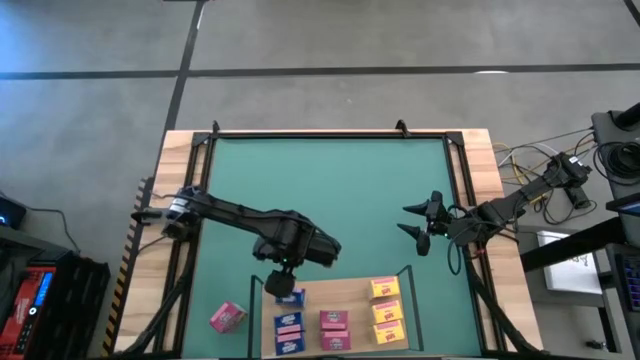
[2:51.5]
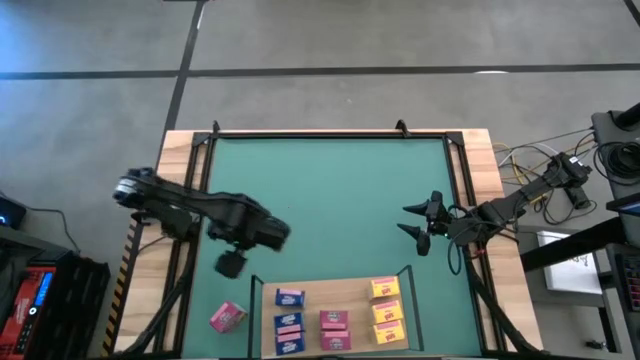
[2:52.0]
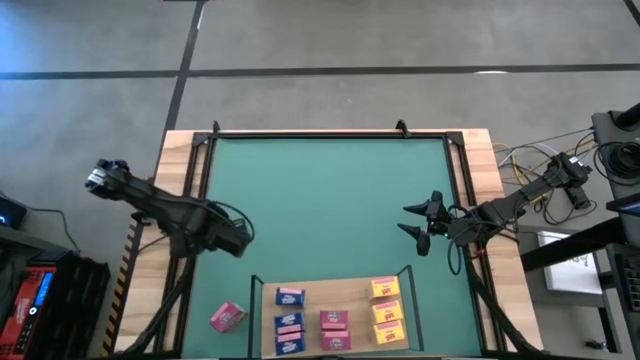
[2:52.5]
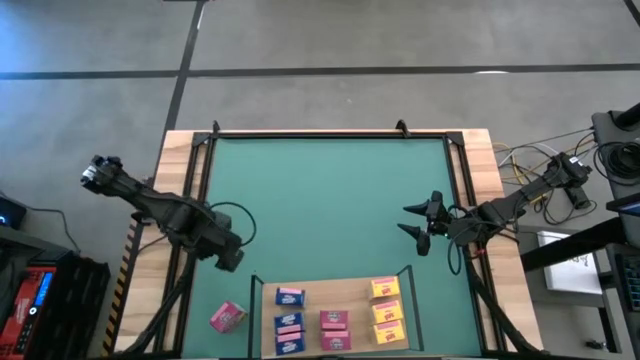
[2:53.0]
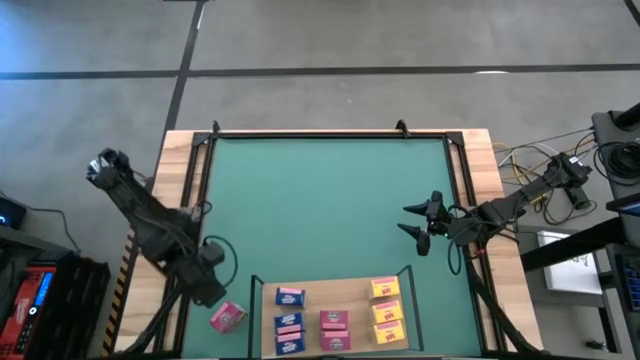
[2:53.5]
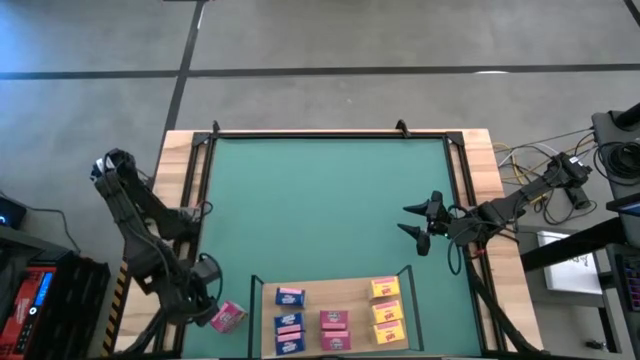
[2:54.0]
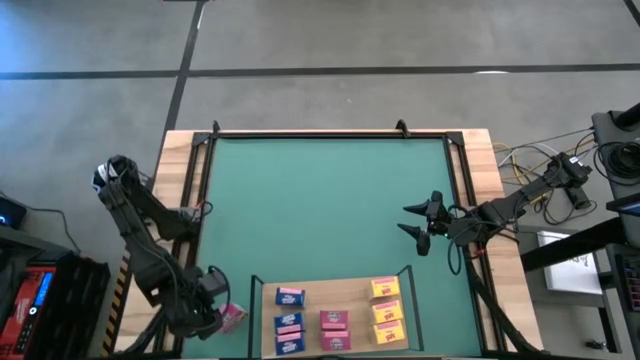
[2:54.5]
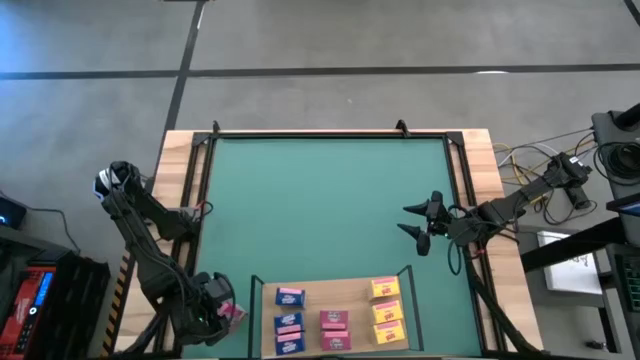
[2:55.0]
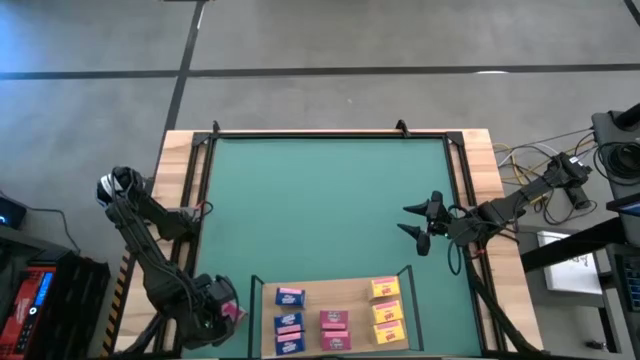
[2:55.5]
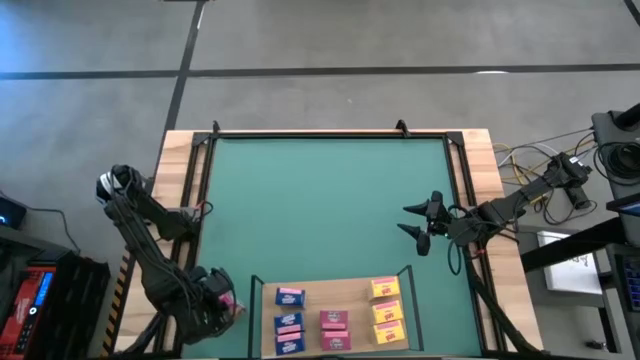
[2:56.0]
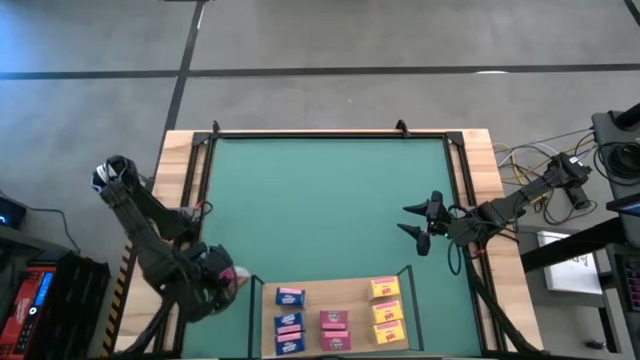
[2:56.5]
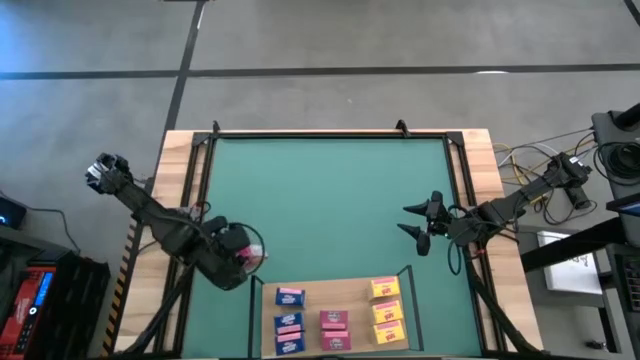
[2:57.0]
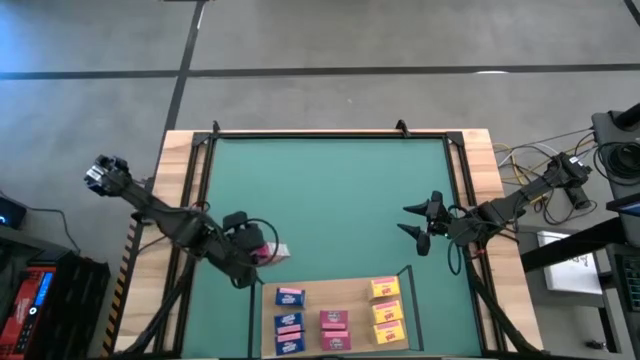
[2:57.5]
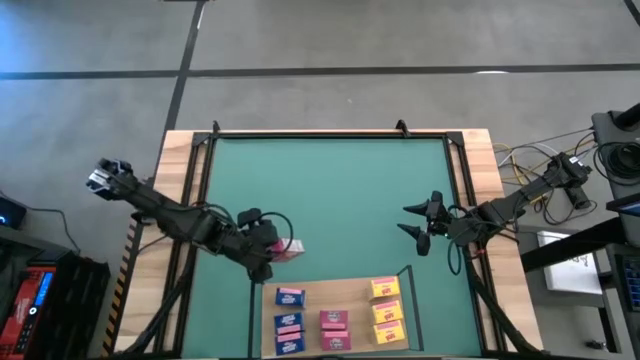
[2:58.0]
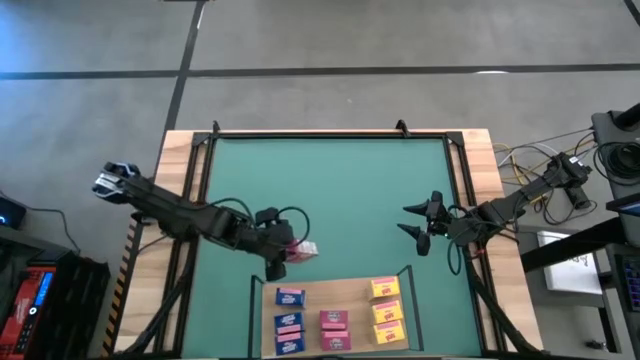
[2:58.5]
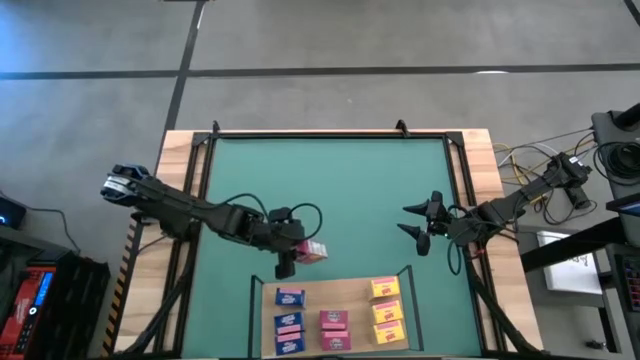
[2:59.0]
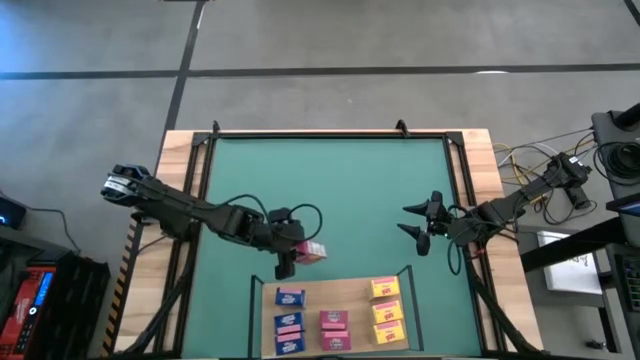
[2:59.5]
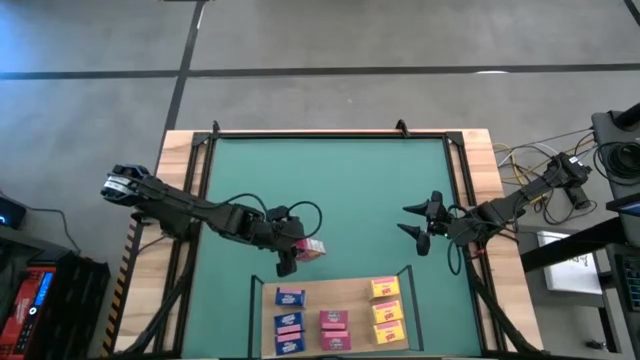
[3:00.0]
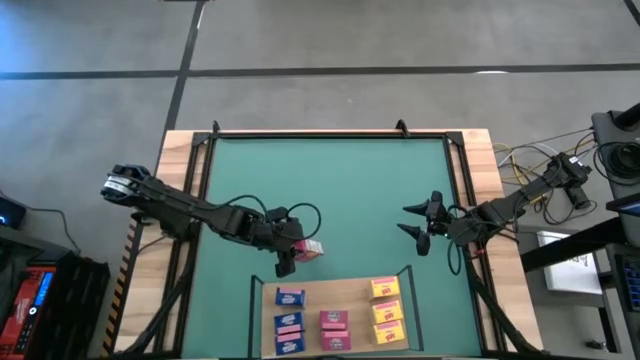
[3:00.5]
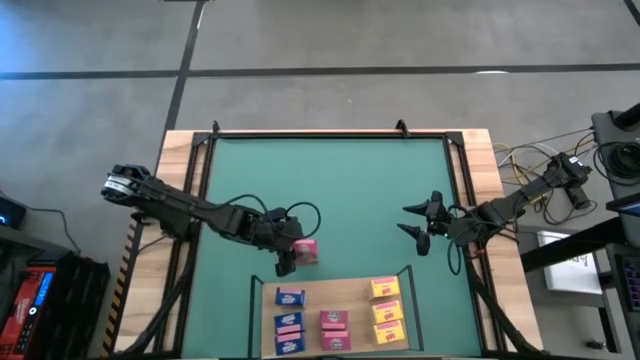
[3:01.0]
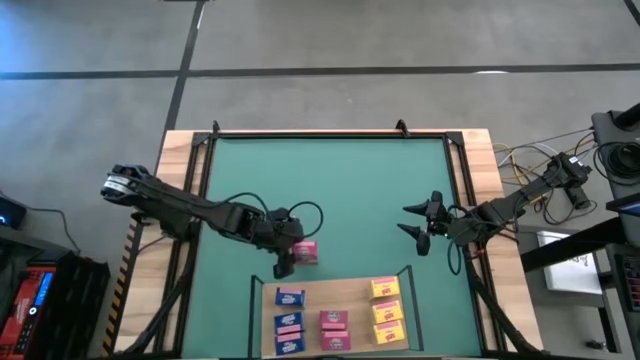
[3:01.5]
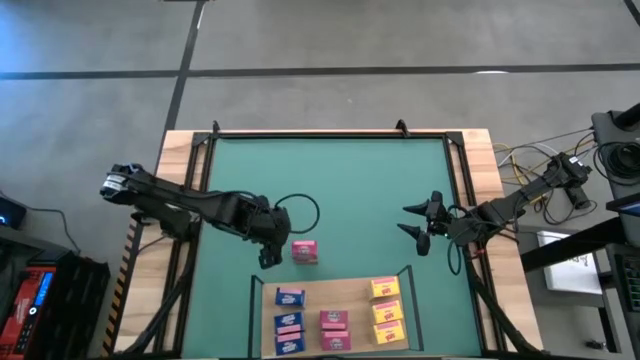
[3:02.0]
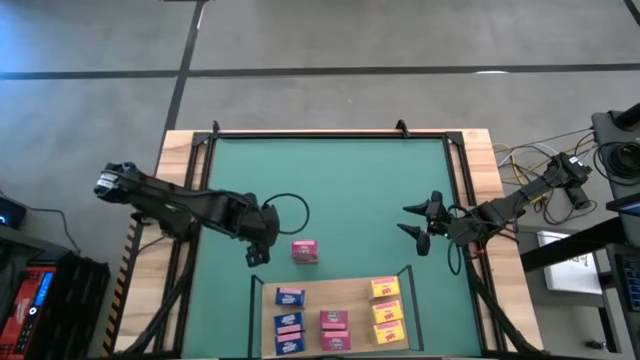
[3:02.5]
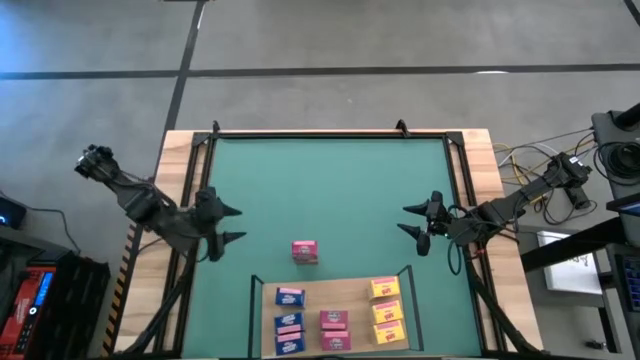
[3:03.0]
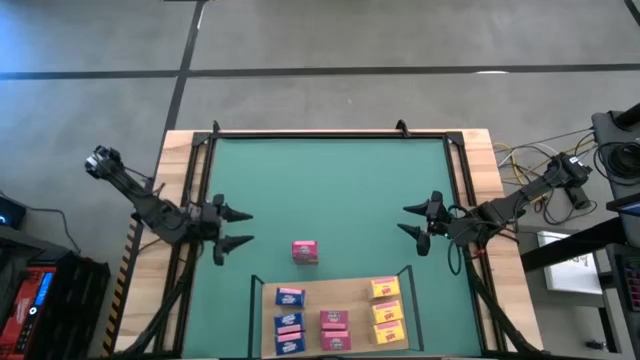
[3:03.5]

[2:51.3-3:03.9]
Task: Stack cereal on shelf
Put the violet cereal box on the shelf aligned with the other violet cereal boxes

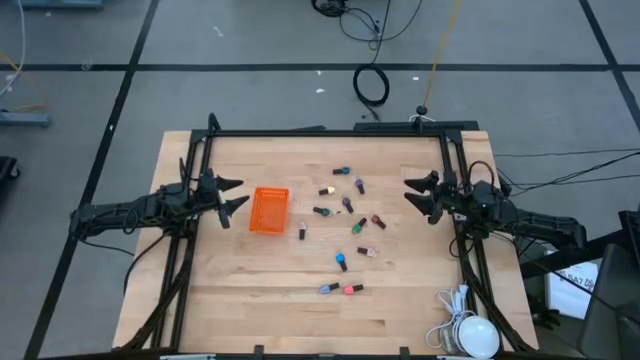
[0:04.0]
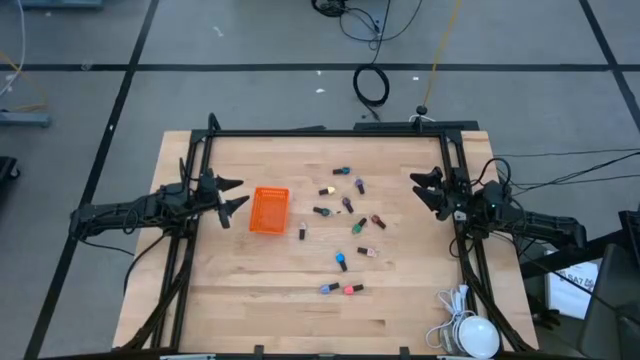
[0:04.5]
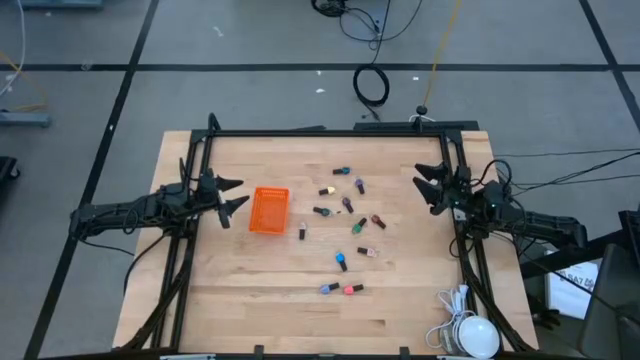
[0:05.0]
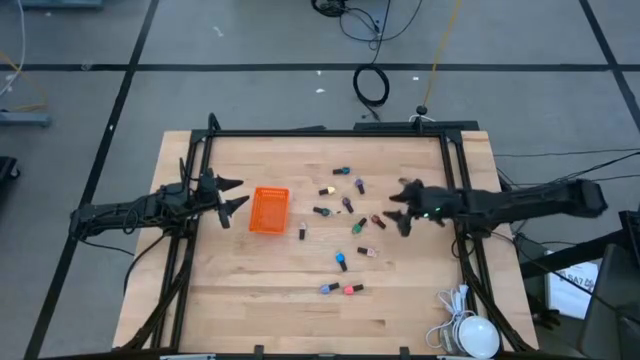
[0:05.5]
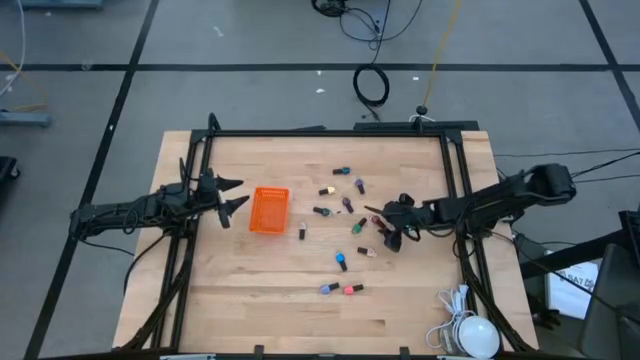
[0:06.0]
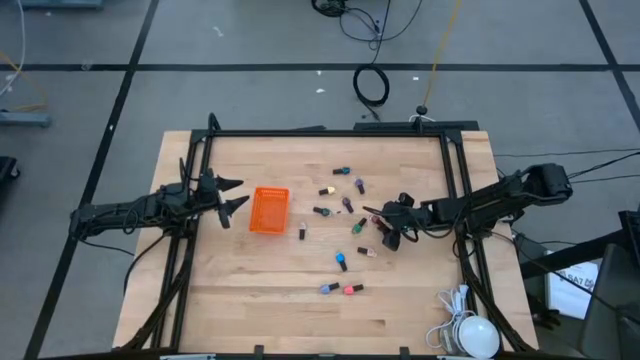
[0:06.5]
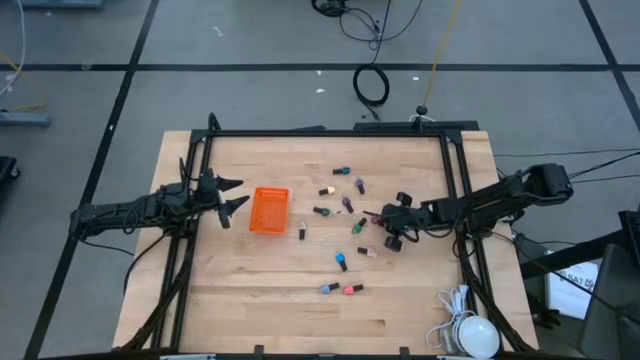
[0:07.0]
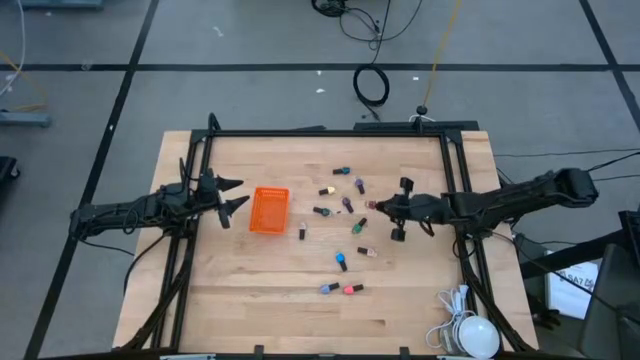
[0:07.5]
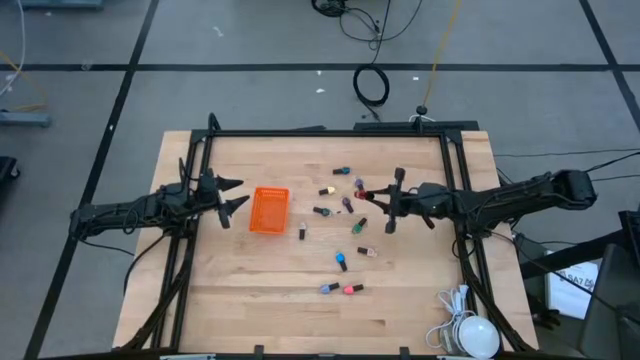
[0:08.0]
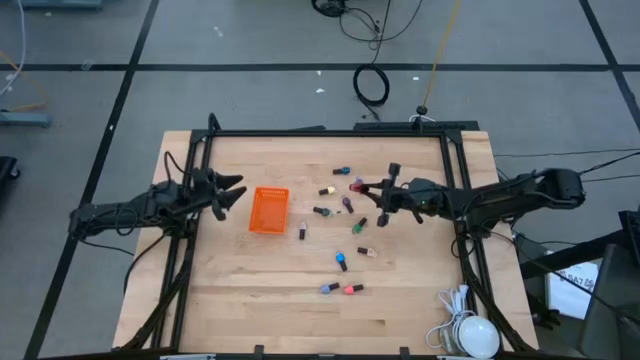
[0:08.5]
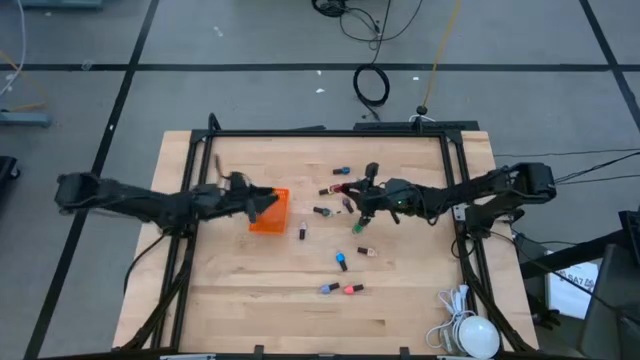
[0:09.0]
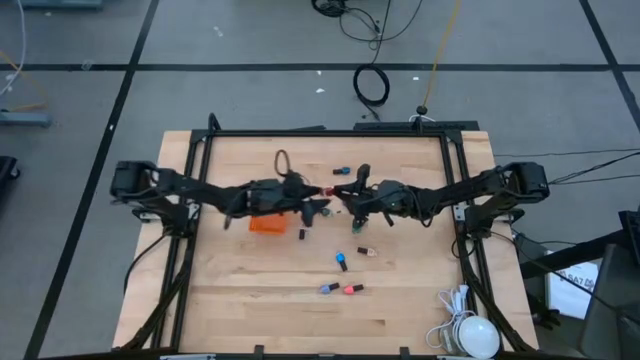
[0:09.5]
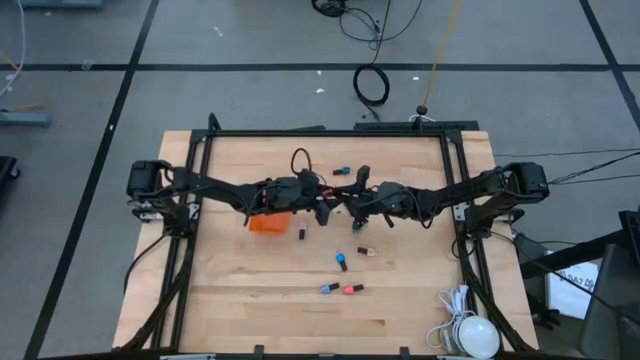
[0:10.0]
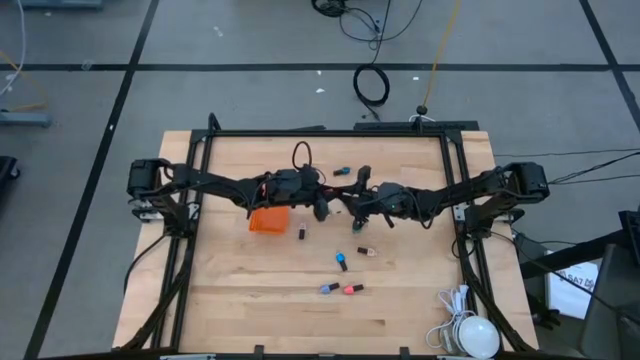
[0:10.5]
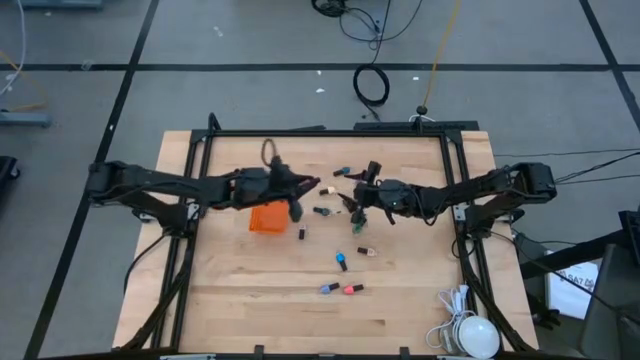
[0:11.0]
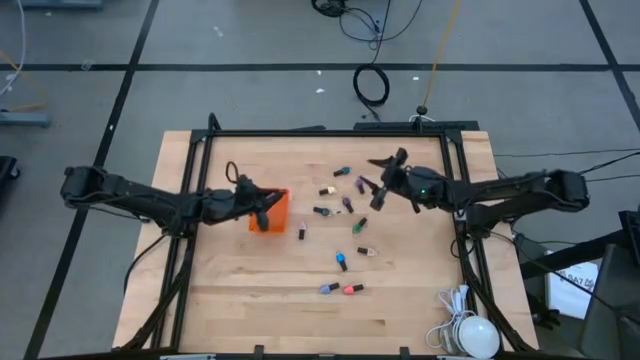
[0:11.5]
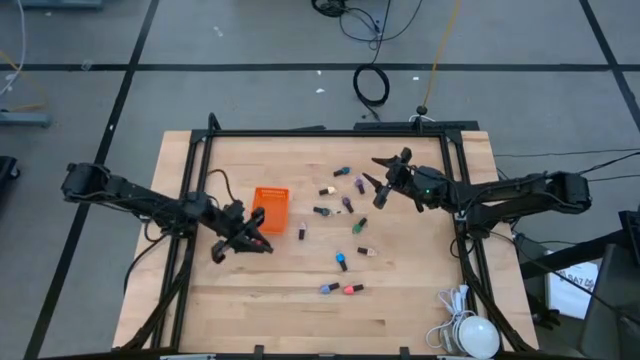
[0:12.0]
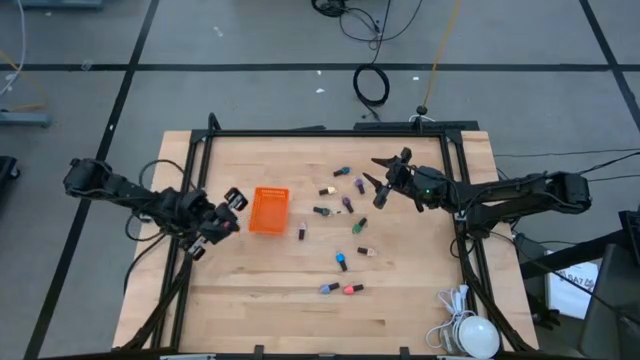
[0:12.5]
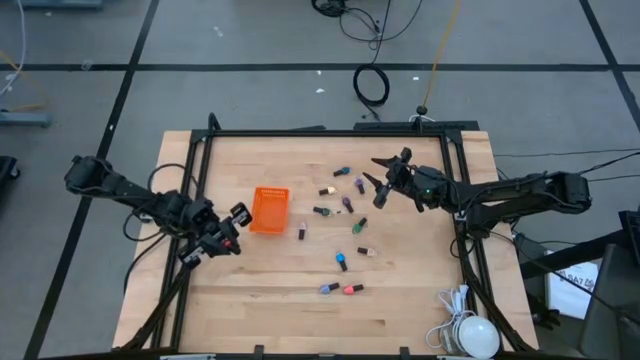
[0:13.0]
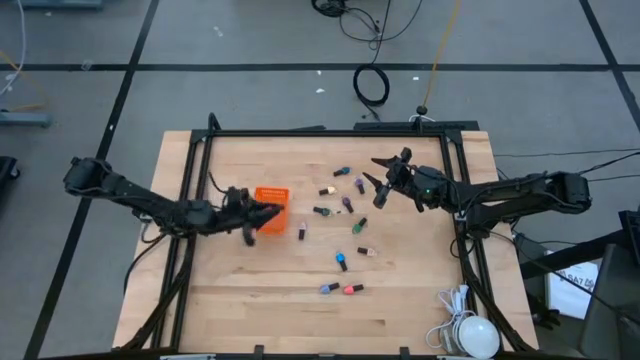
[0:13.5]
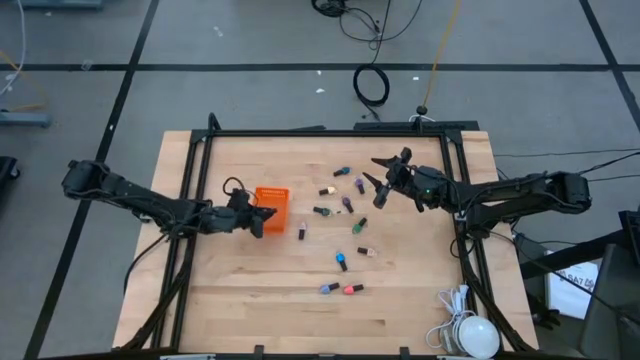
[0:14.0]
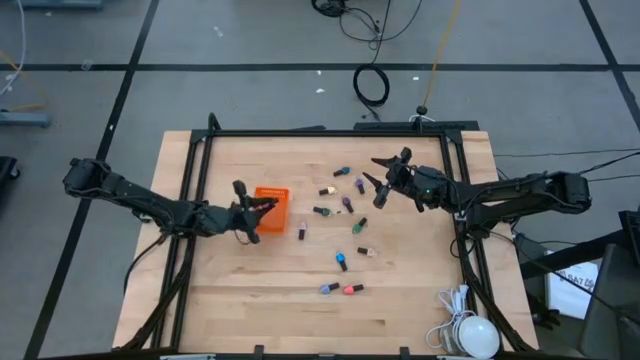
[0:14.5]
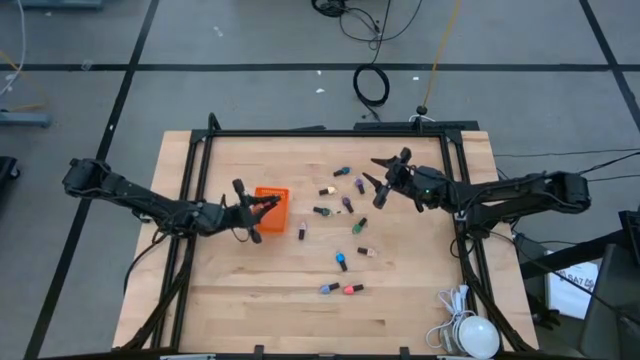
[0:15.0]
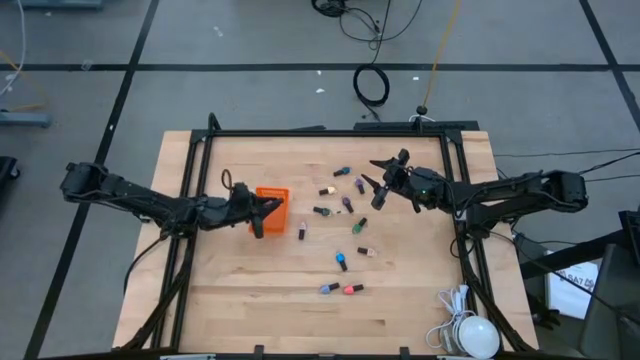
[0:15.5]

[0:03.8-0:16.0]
Task: Pick & Place Nail Polish
Put the red nail polish into the orange basket
